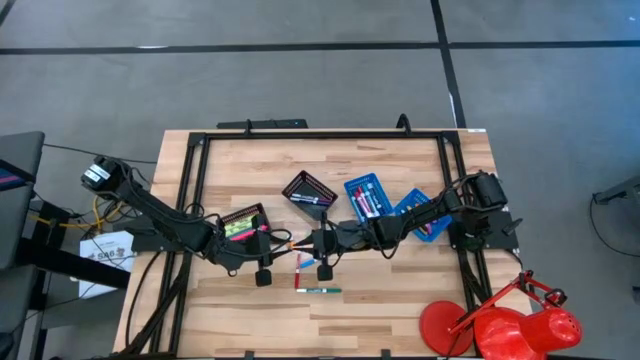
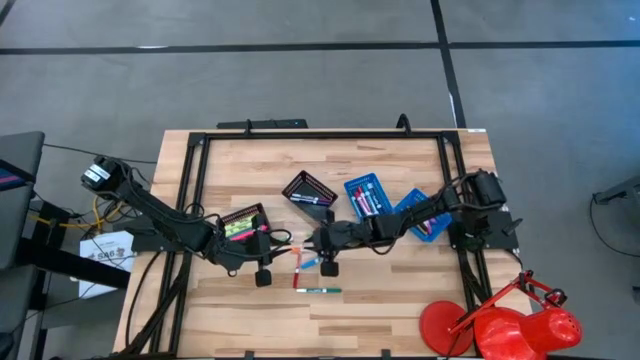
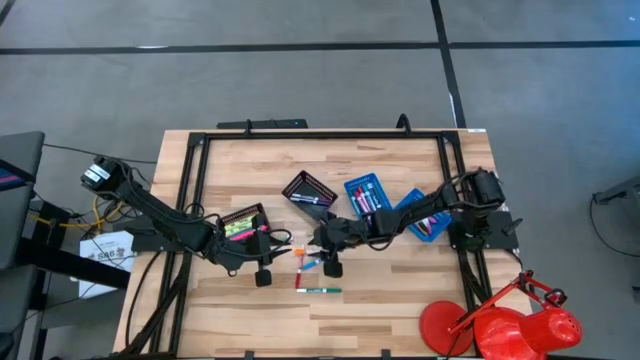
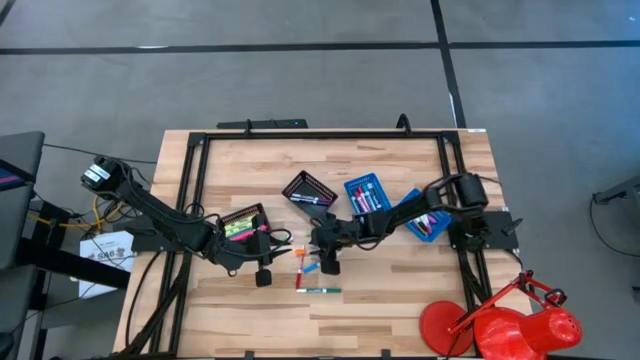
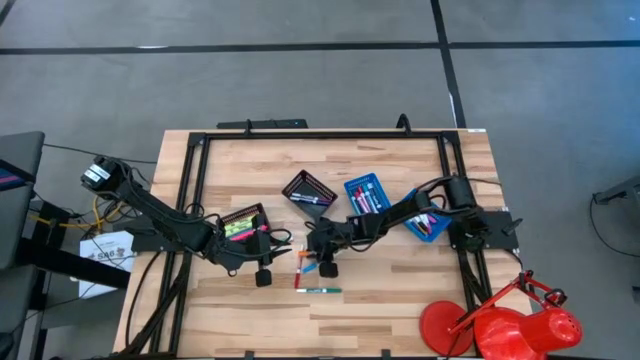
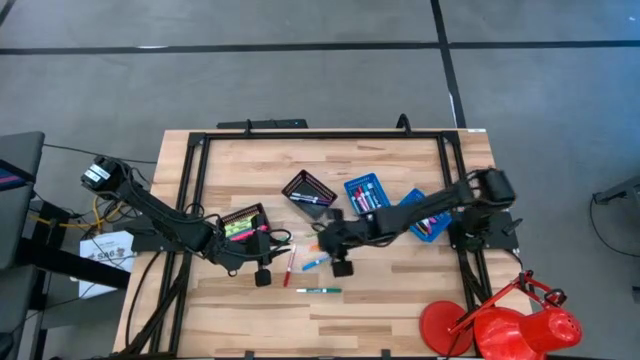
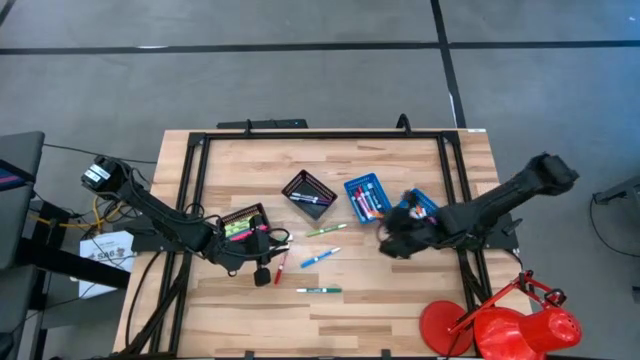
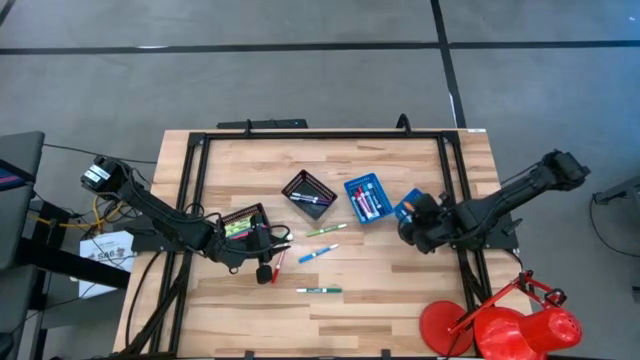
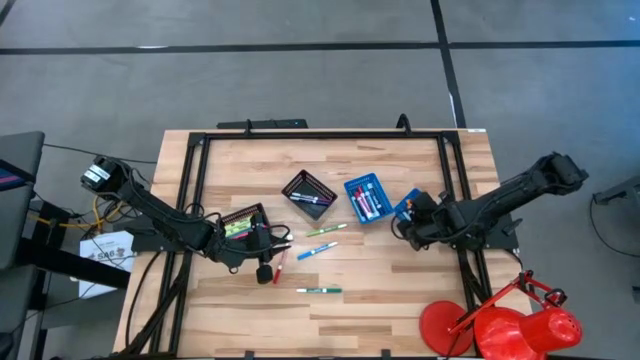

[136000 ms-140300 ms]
Task: Pick & Place Markers
Put the orange highlighter into the right blue bin

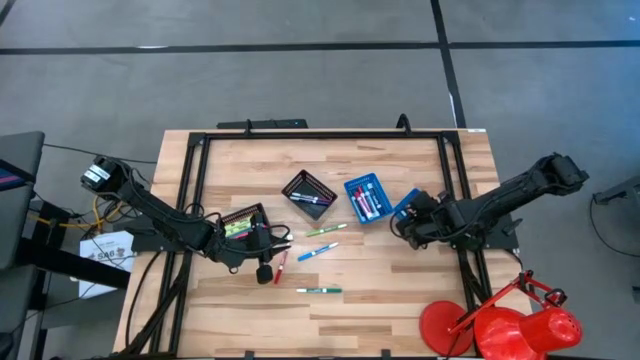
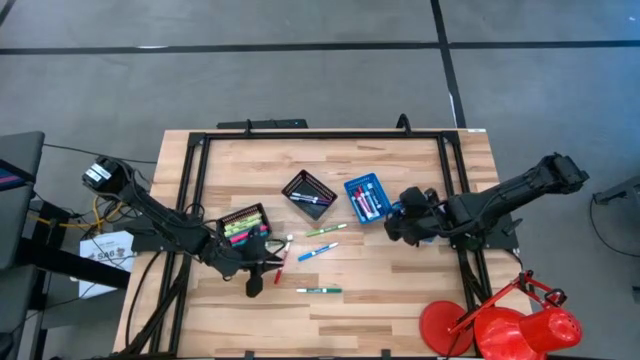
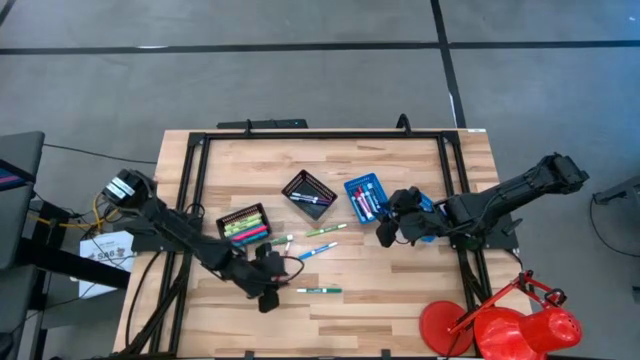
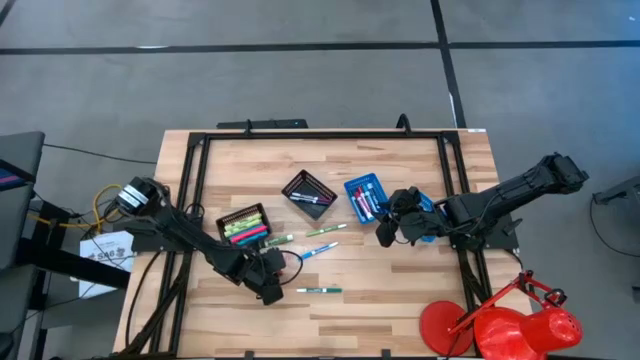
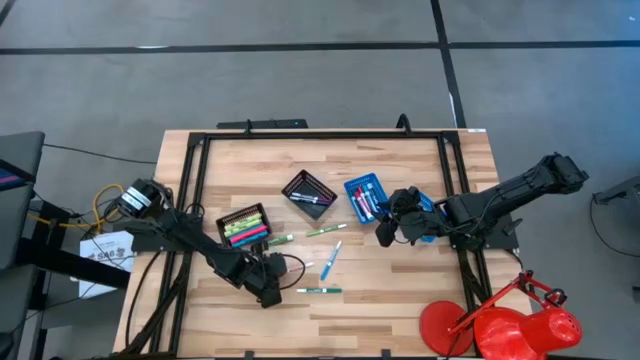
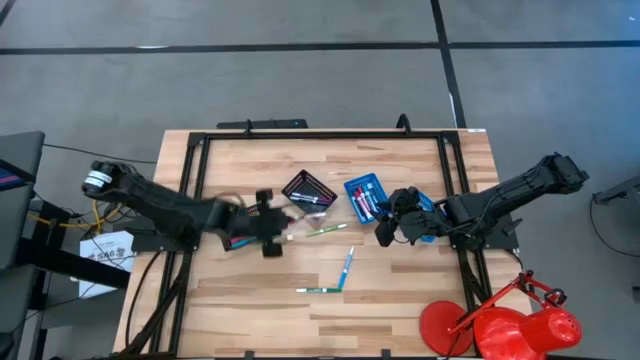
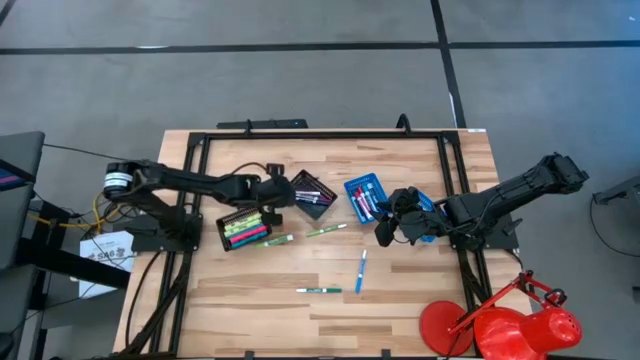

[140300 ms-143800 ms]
Put the small red marker into the right black bin

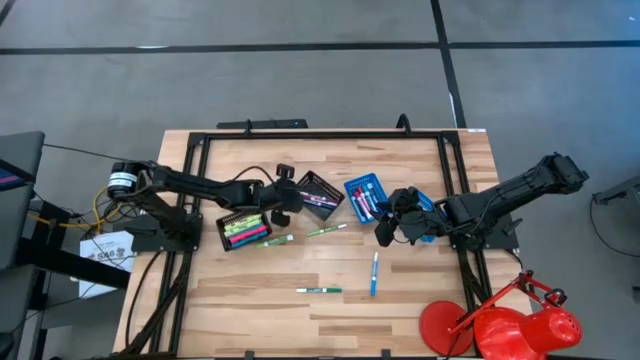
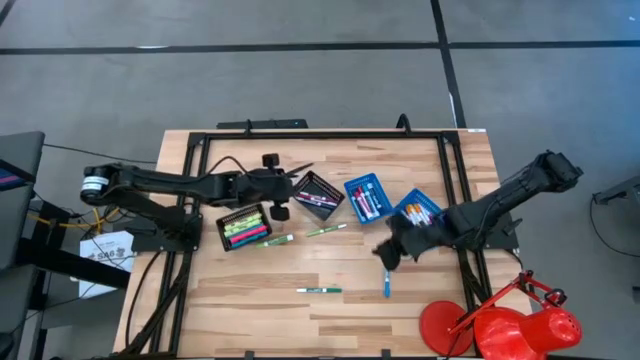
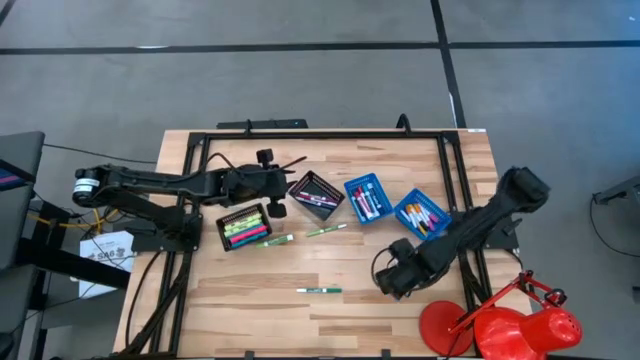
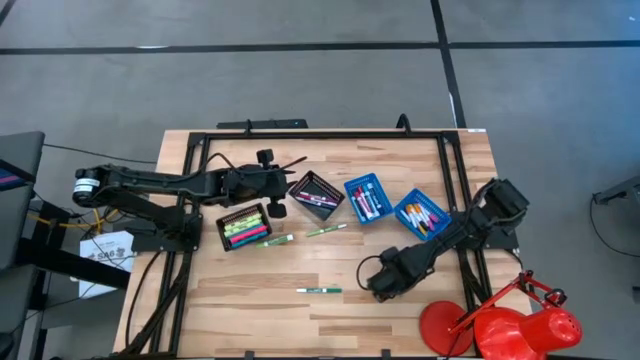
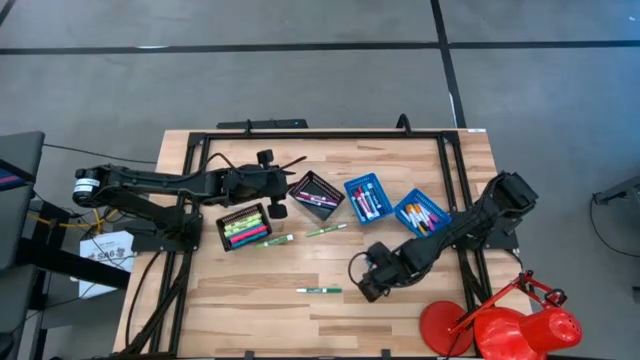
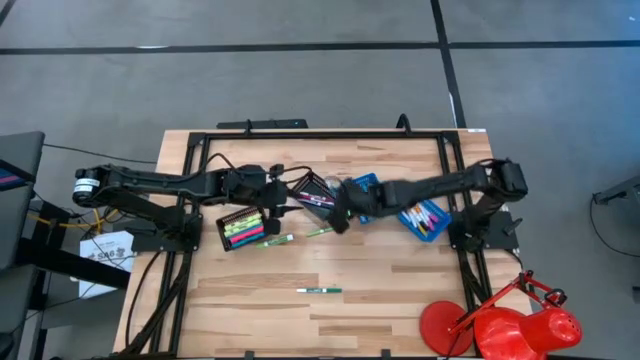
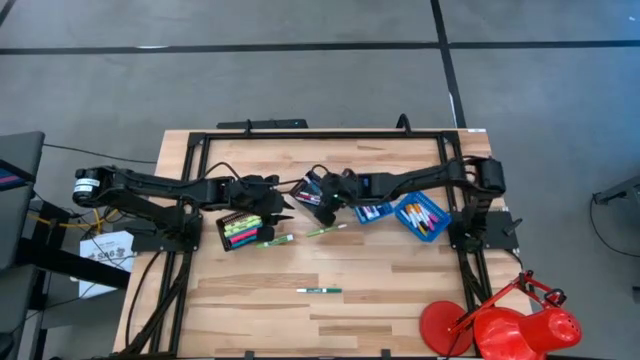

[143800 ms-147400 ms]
Put the small blue marker into the right black bin

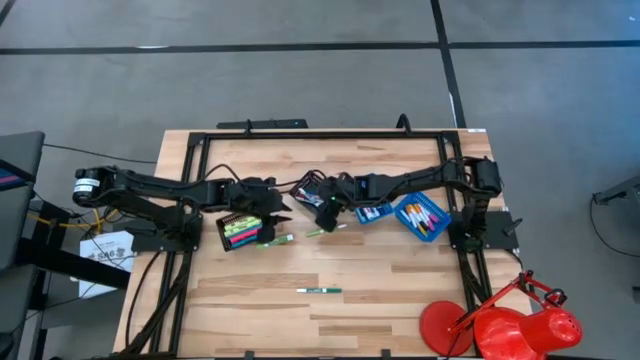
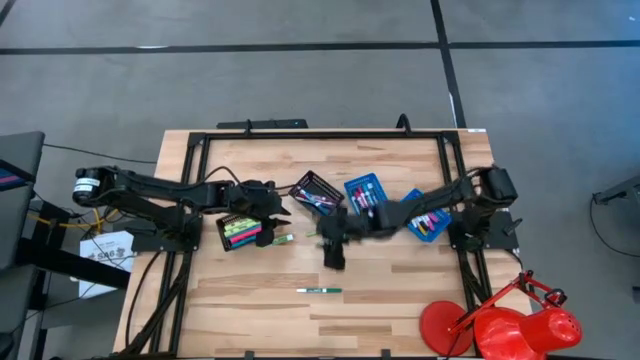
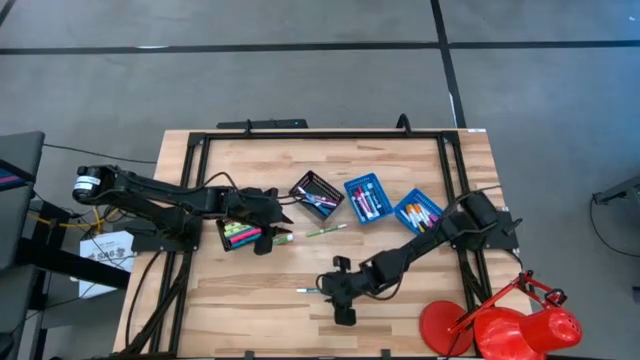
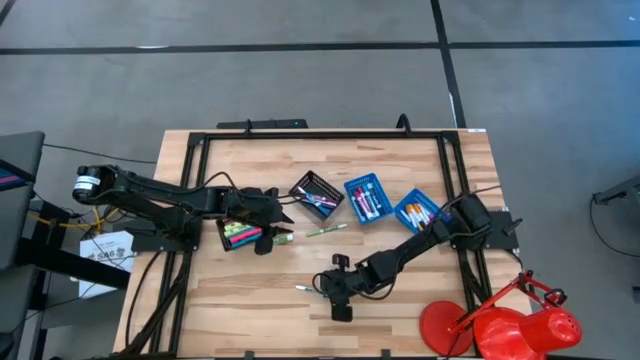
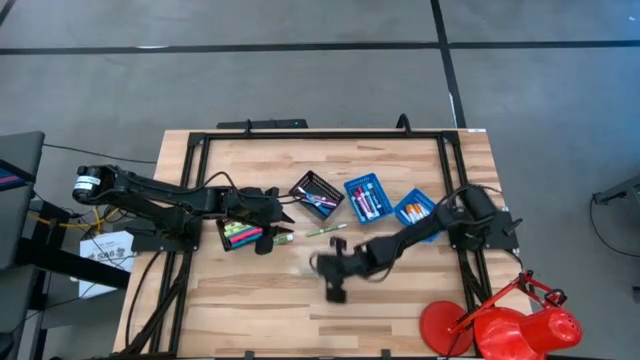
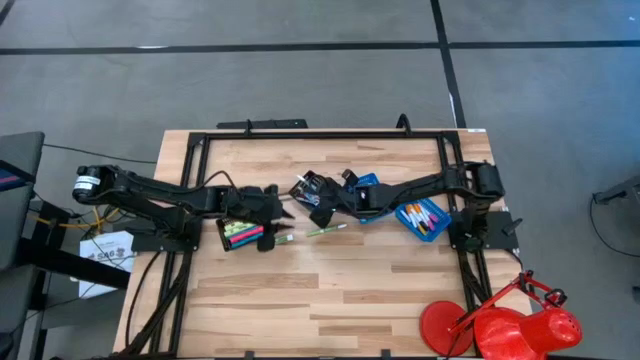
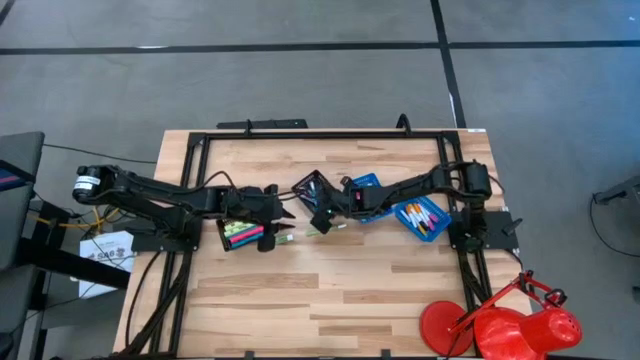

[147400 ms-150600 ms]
Put the small dark green marker into the right black bin

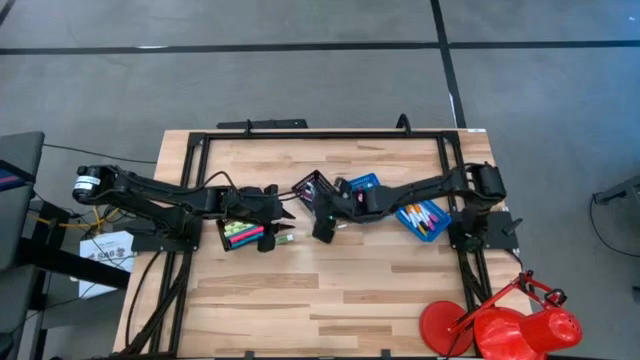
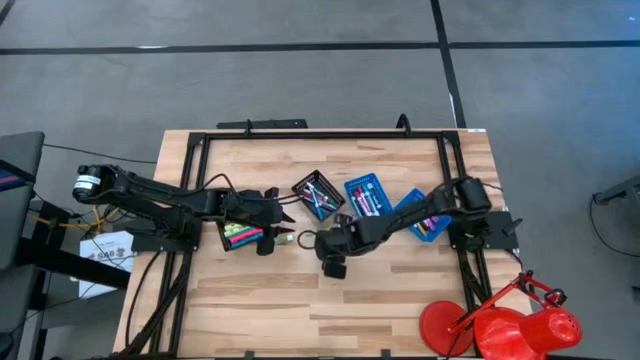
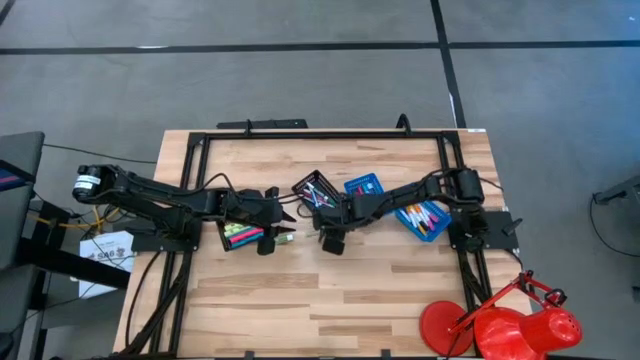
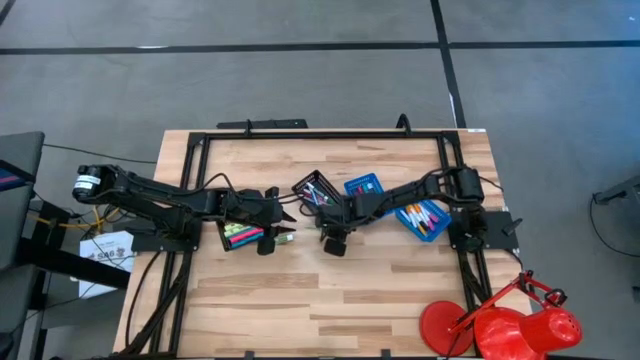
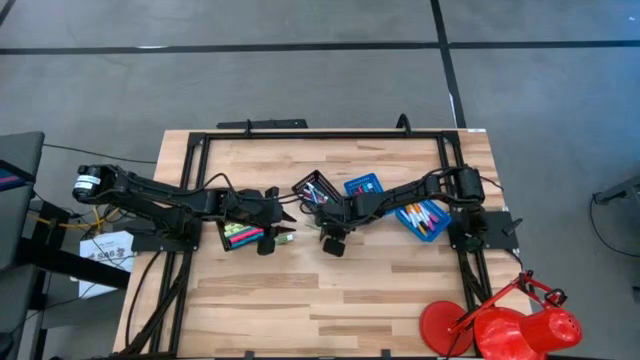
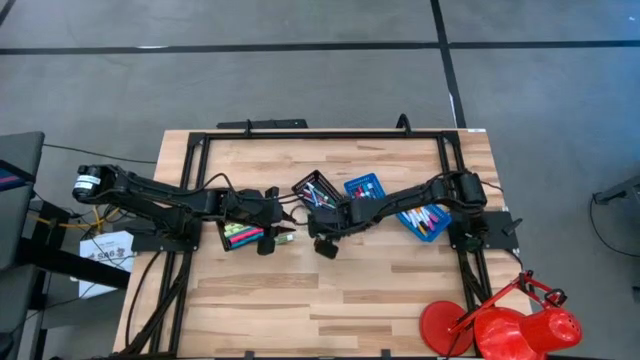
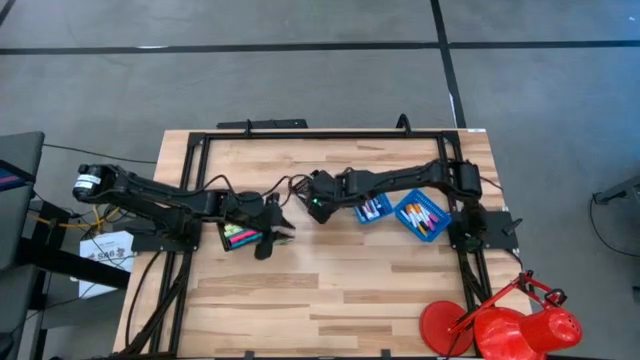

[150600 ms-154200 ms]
Put the small light green marker into the right black bin

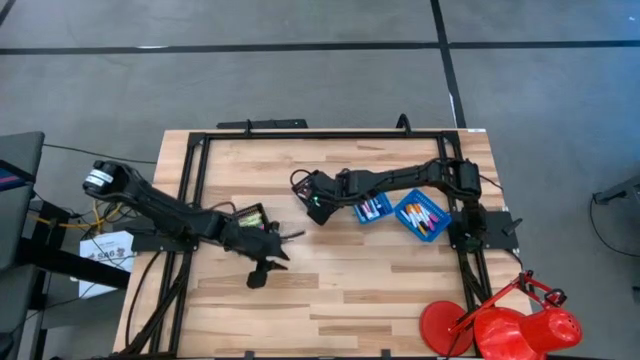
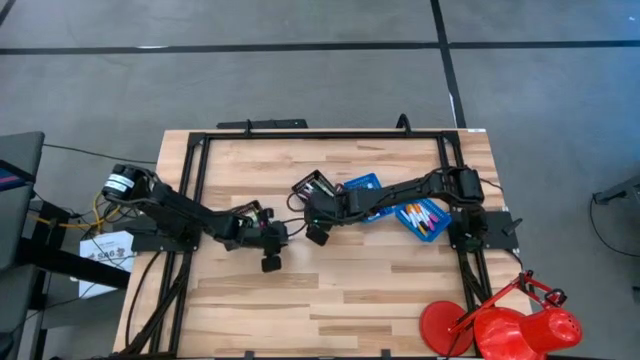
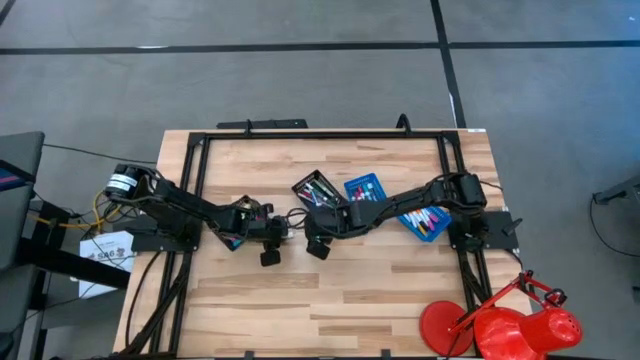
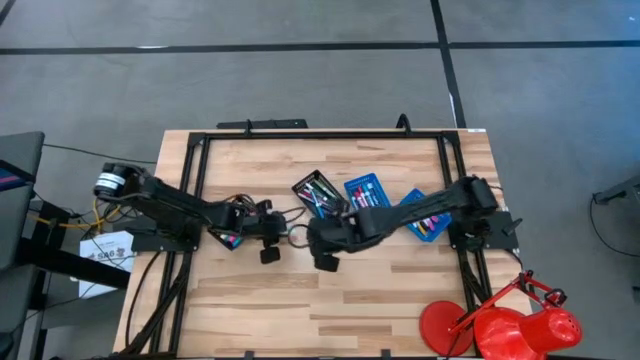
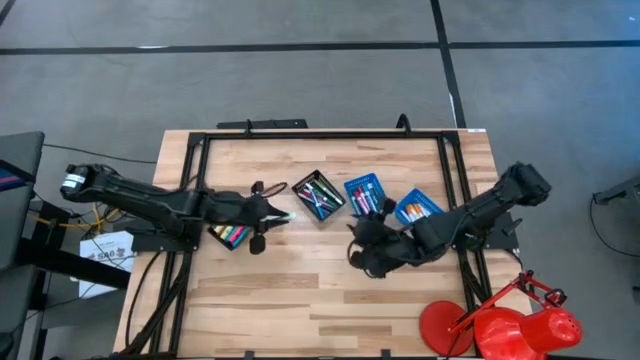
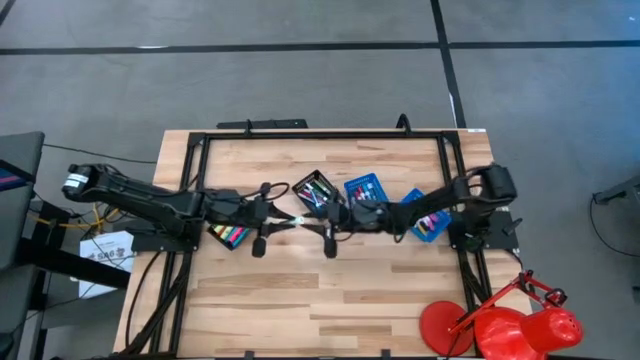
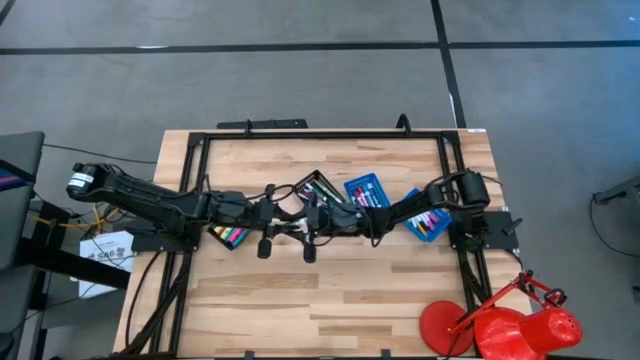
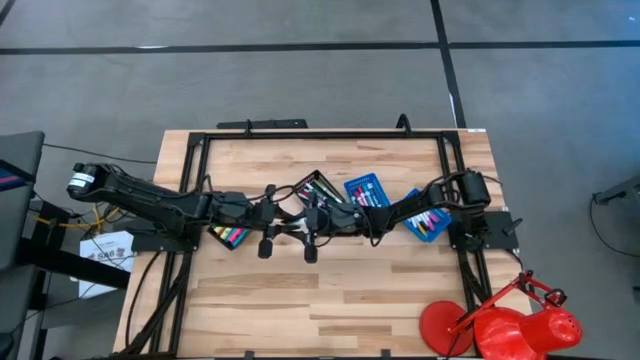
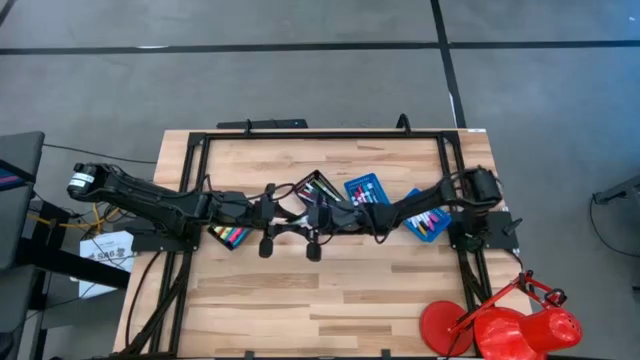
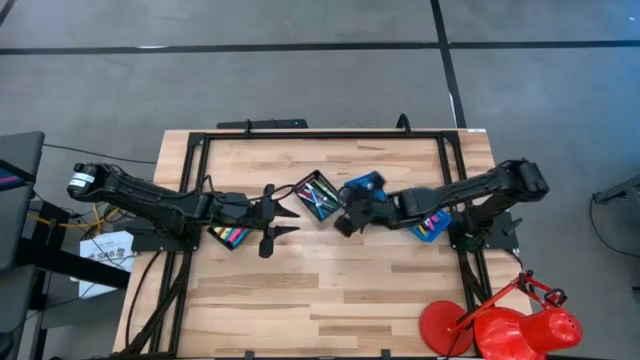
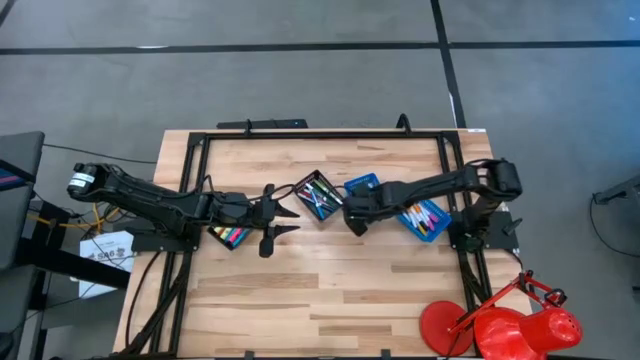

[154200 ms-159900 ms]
Put the large light green marker into the left blue bin
